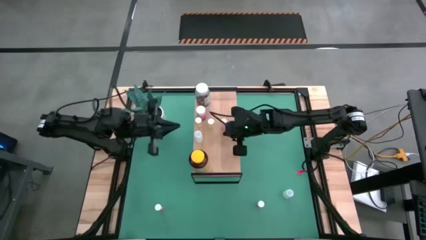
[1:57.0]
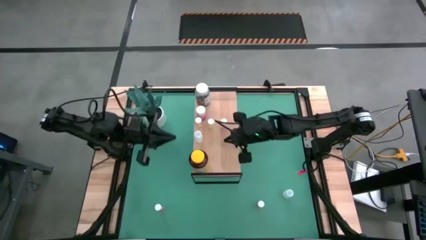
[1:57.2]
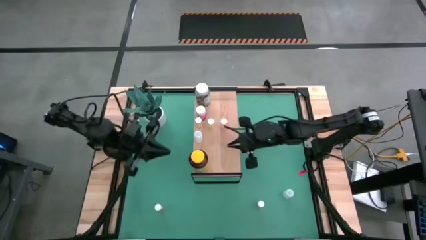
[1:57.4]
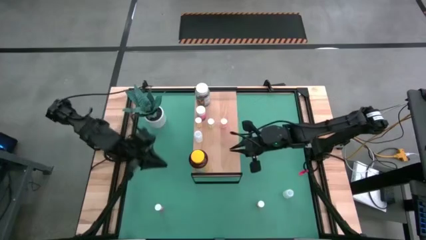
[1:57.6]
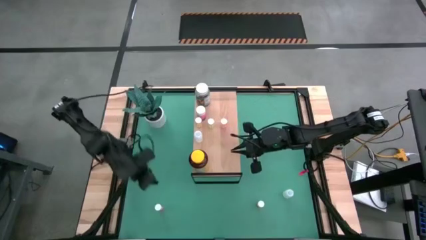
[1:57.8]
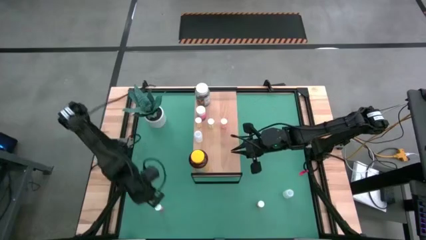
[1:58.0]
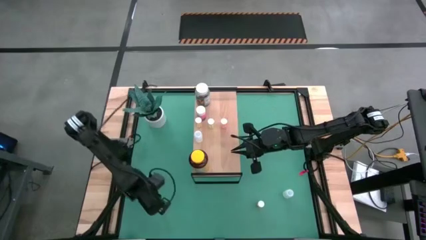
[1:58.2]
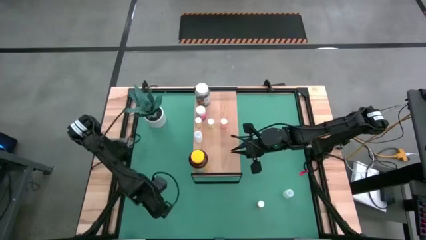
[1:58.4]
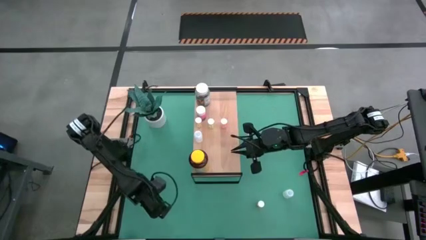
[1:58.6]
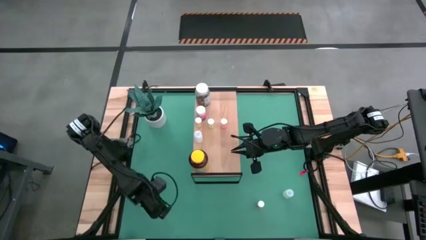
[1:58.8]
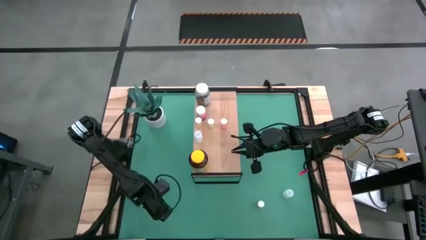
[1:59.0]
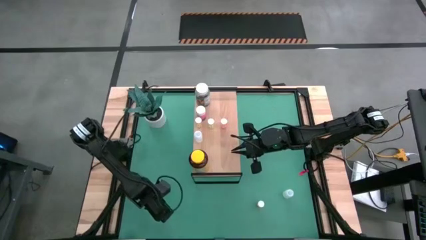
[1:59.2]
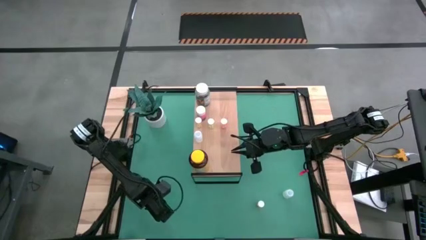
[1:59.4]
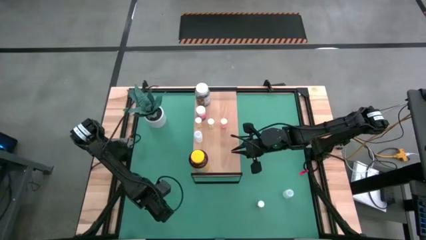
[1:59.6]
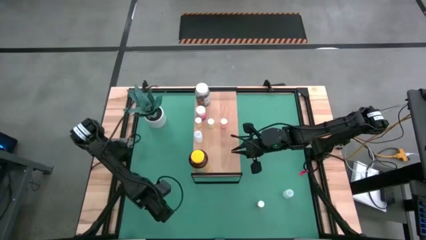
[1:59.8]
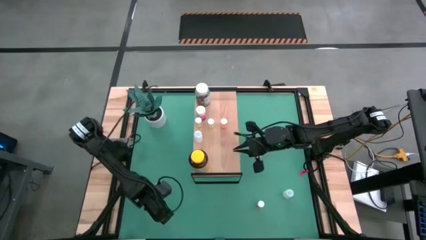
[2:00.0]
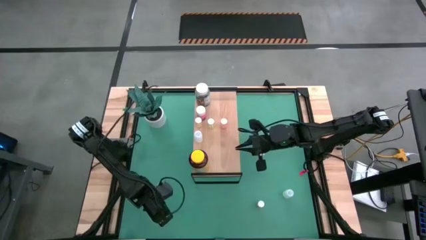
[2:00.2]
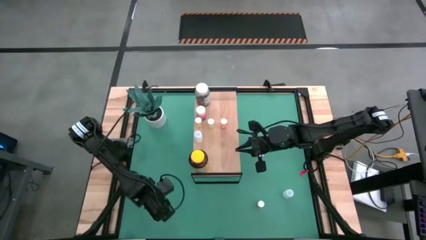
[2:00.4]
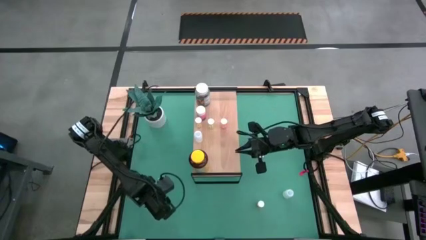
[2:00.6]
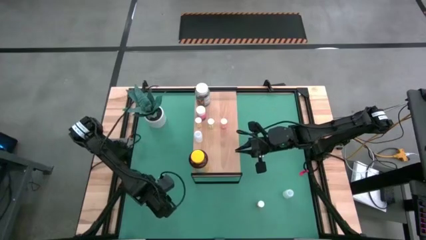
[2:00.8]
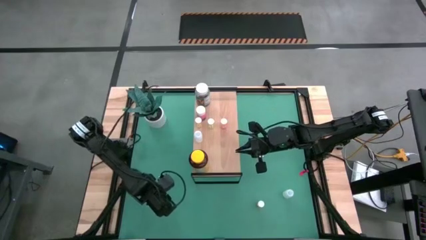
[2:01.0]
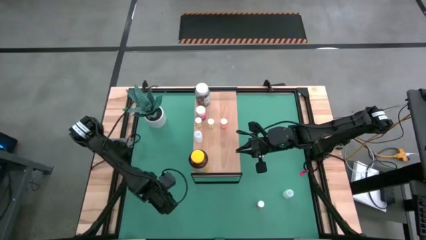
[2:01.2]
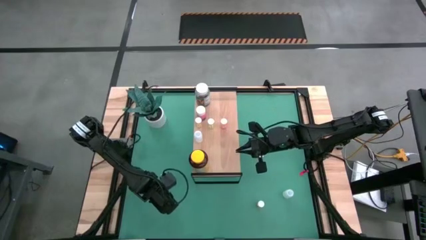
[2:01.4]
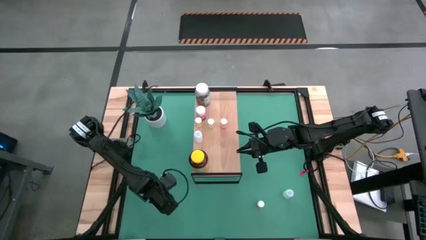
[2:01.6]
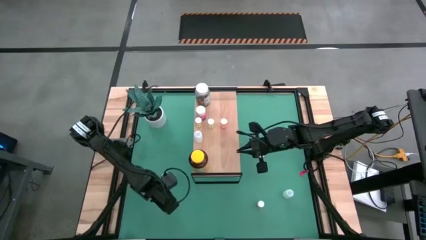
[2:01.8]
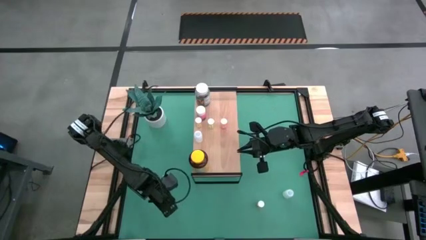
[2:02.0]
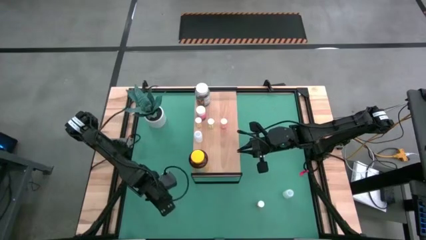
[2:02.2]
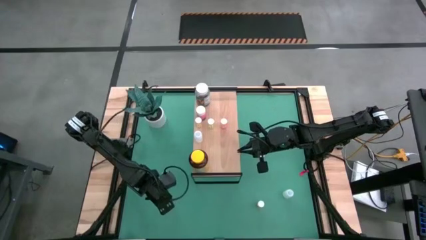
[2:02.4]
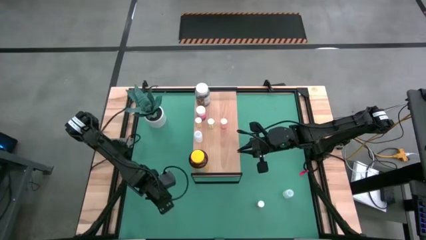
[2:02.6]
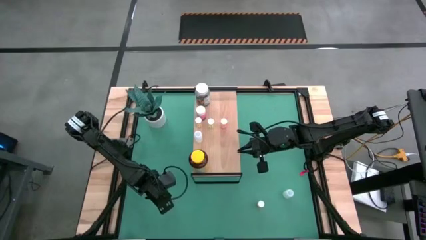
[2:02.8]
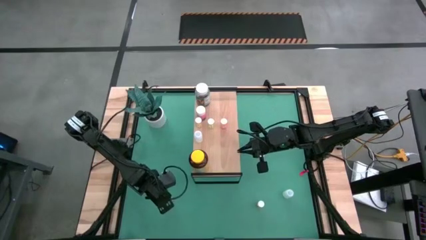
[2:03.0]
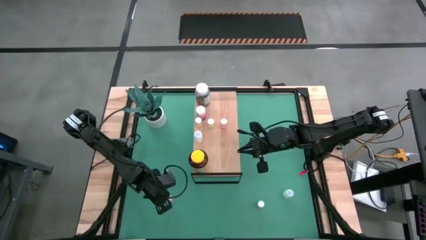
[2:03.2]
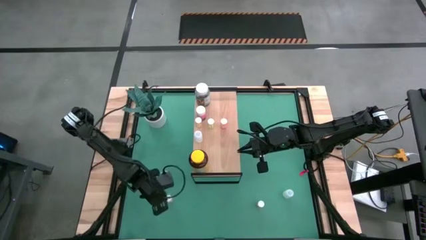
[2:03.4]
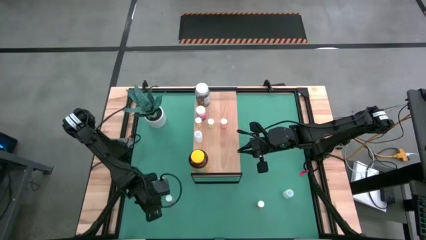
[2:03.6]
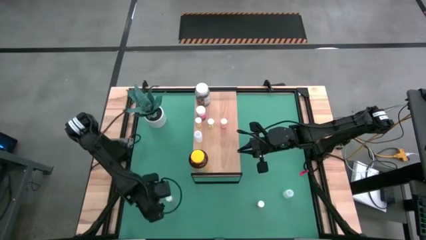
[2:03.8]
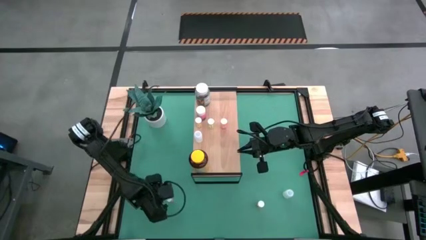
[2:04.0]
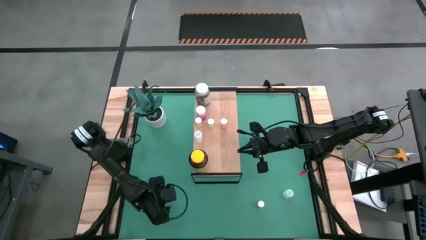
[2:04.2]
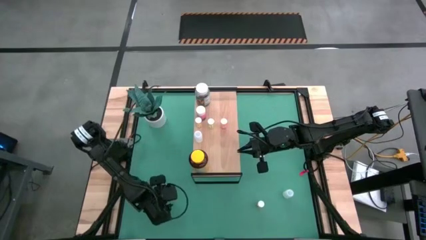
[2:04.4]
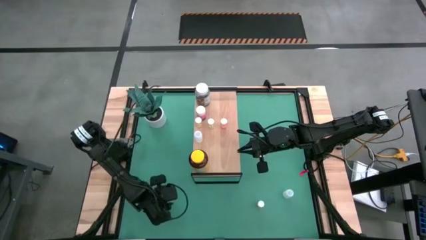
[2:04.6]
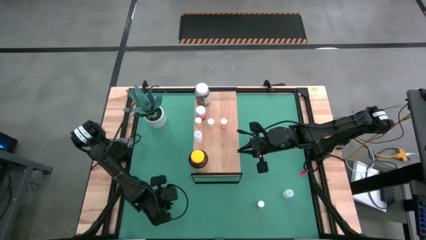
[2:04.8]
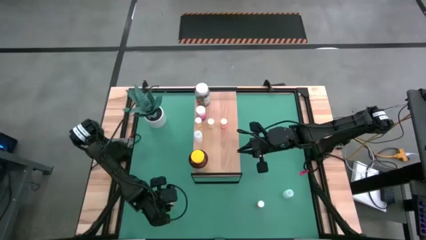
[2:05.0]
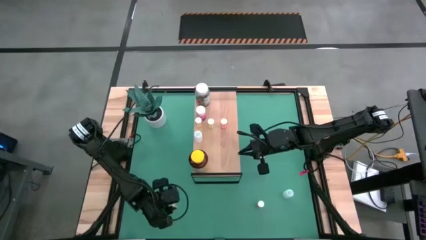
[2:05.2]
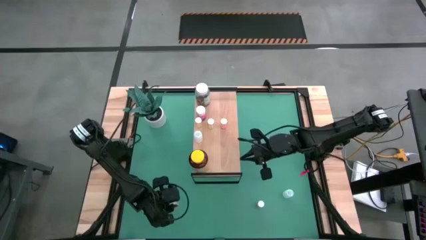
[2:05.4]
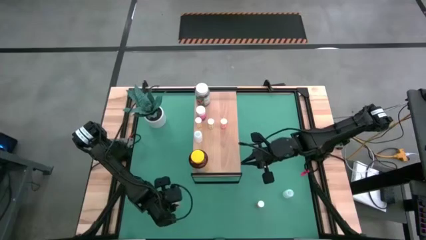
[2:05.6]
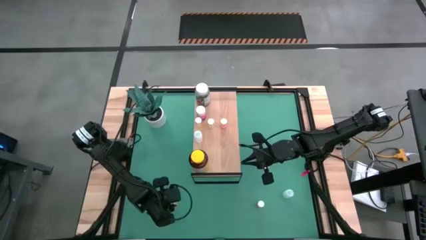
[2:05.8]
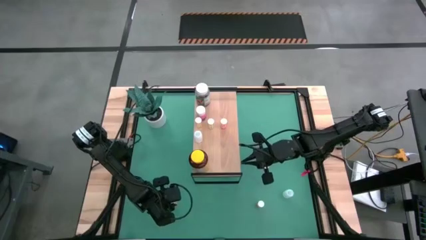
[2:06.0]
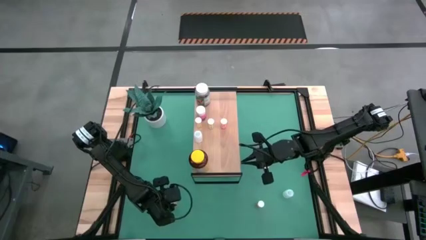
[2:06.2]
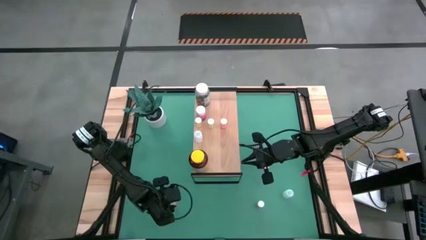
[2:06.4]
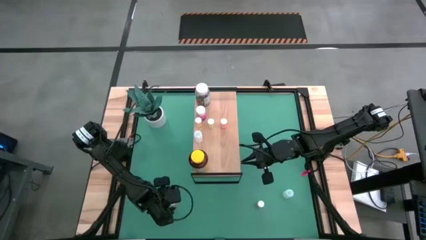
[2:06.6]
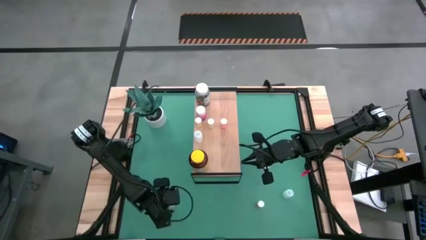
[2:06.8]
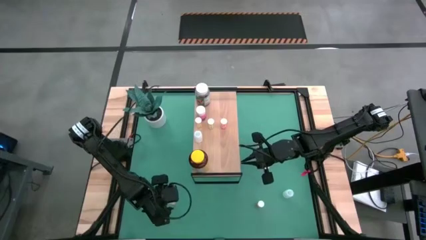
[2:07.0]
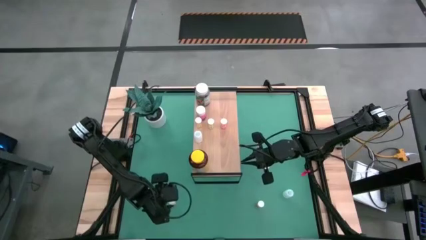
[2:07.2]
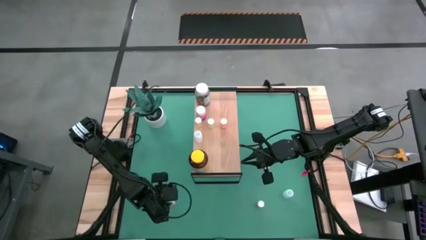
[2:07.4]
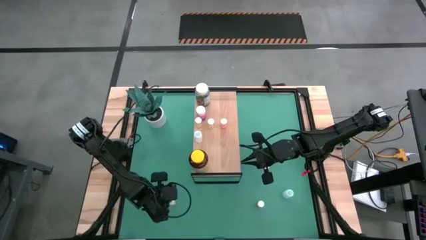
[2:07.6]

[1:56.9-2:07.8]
Task: Pick and place medicine bottles onto shelf by color
Put the yellow pill bottle on the shelf

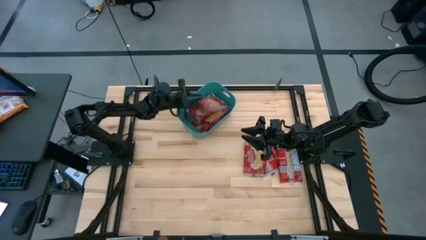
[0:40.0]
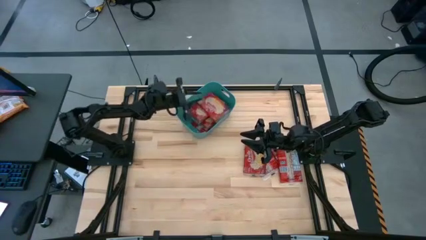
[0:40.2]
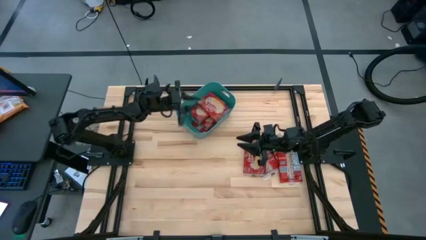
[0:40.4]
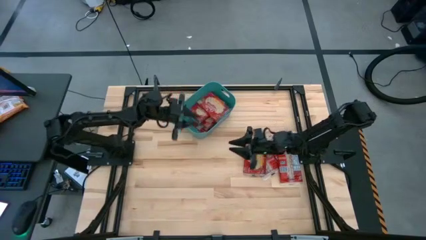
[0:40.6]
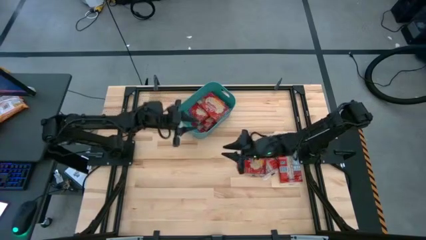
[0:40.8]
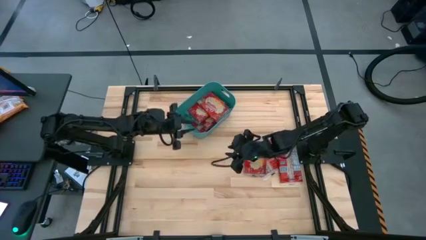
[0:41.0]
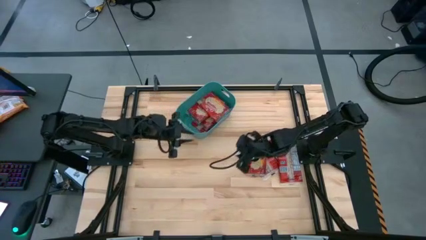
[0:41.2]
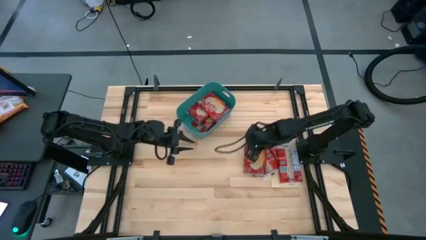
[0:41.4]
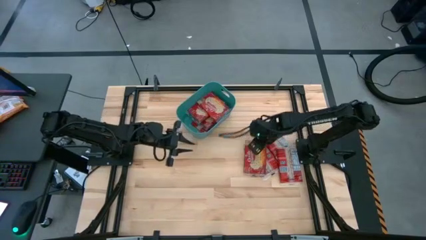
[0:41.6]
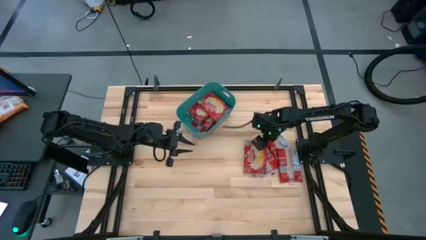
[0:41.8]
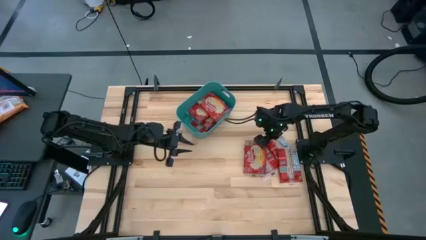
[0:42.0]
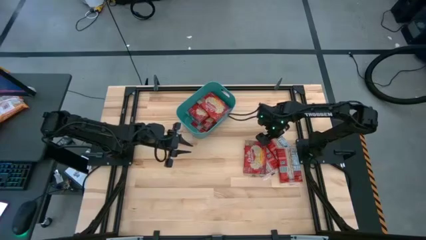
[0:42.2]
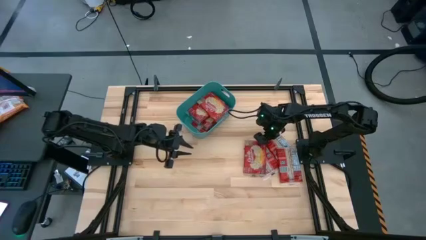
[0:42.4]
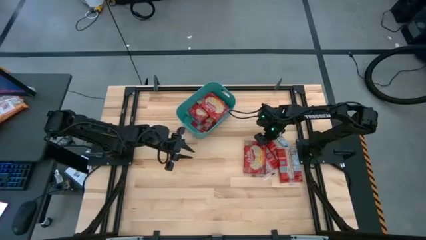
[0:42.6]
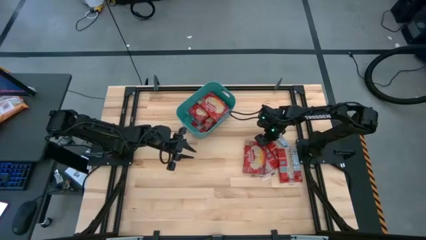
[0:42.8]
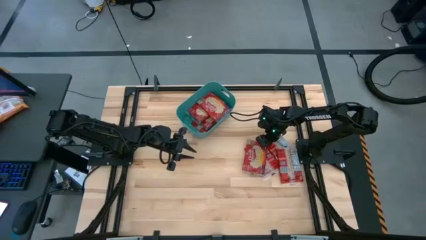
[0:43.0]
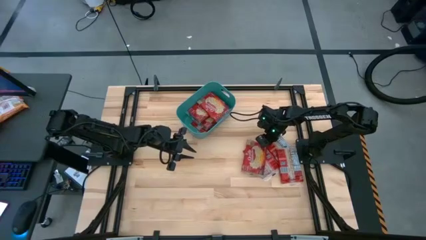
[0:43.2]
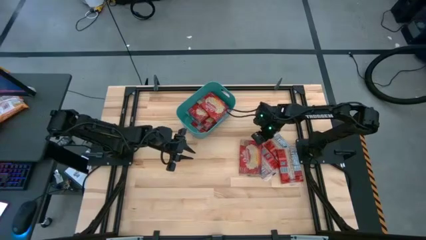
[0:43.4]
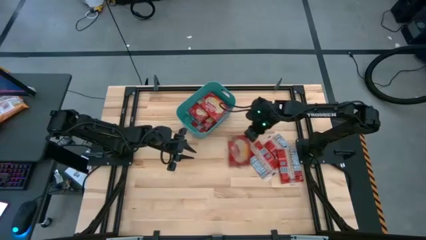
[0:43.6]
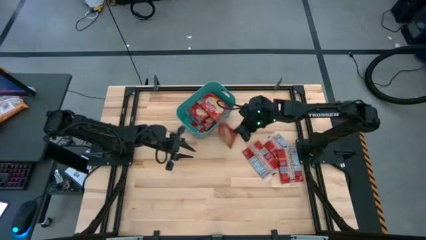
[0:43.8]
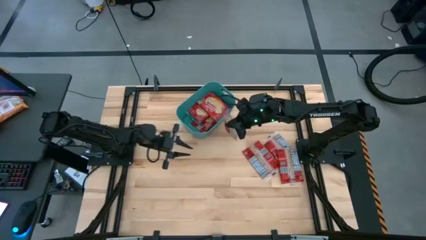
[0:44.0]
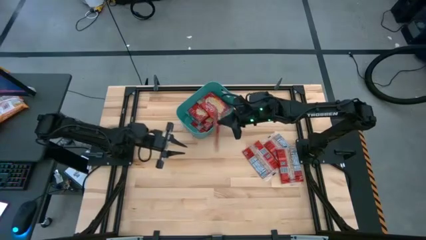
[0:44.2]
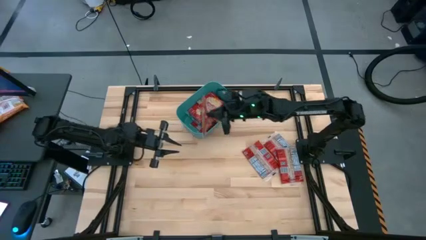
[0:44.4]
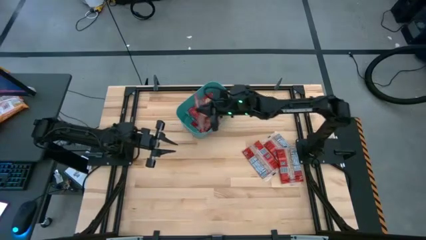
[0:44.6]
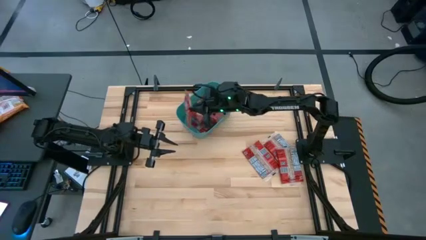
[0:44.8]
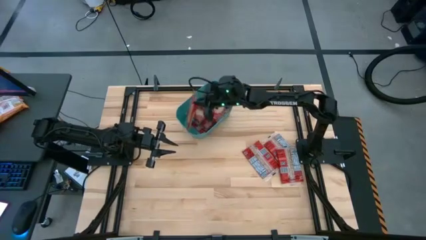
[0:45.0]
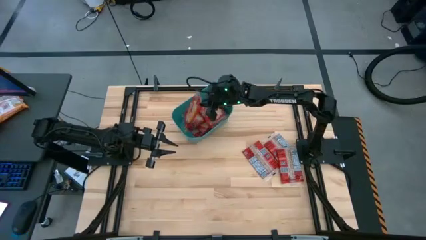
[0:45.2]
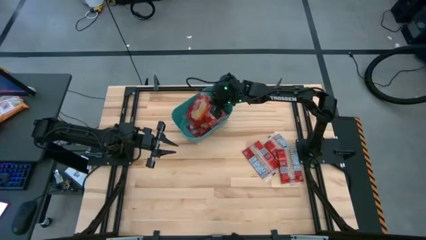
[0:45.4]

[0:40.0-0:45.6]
Task: Sort popcorn bags into baskets
Put the red popcorn bag into the green container

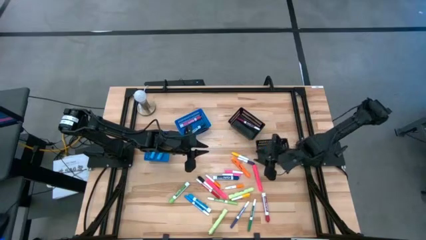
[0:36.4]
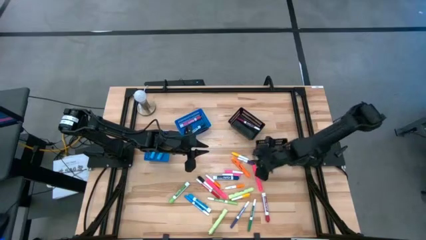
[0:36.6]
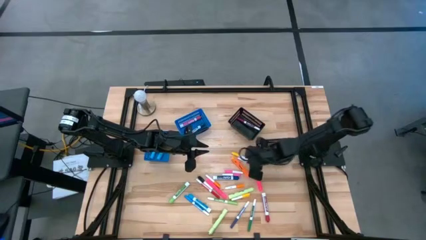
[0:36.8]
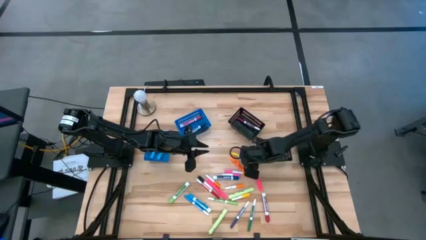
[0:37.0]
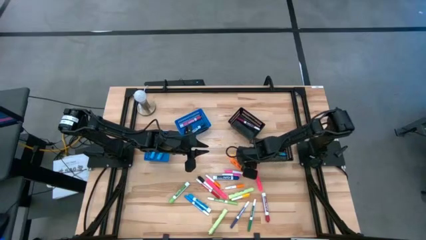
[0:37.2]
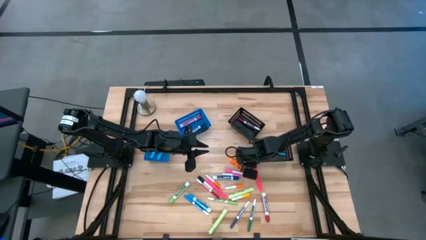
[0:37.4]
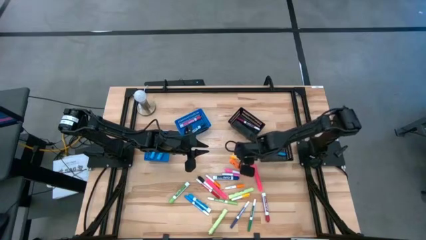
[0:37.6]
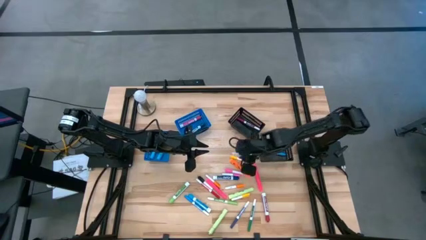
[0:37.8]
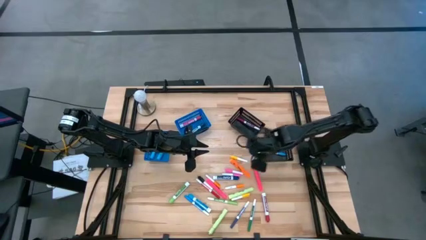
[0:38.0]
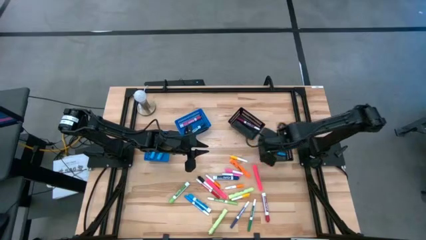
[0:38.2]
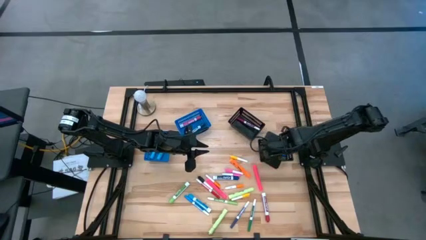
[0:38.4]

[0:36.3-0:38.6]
Task: Pick & Place Markers
Put the purple highlighter pen into the bottom black bin
